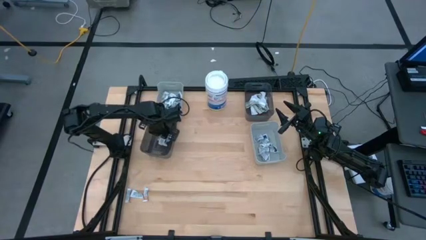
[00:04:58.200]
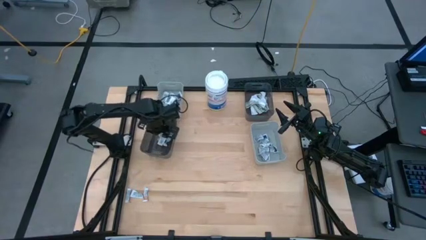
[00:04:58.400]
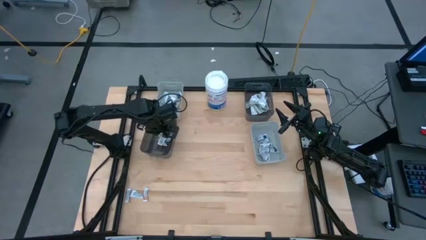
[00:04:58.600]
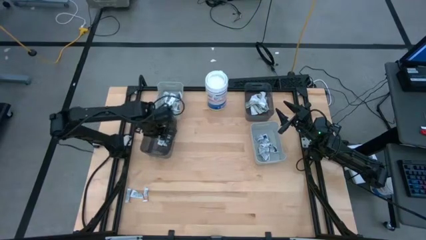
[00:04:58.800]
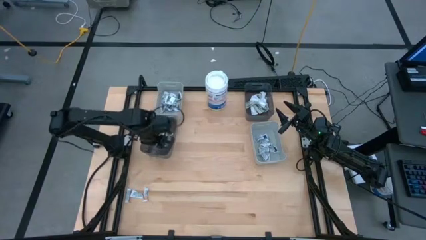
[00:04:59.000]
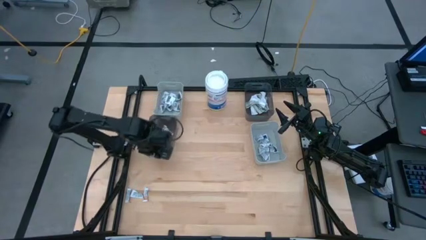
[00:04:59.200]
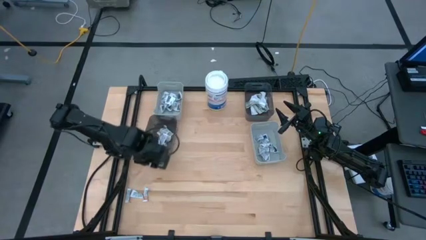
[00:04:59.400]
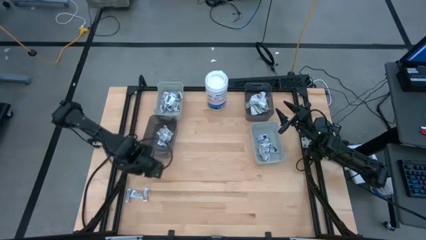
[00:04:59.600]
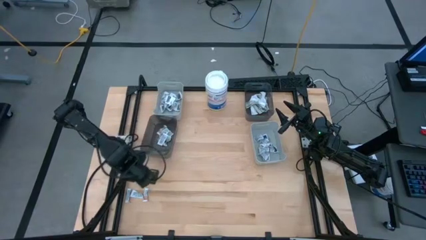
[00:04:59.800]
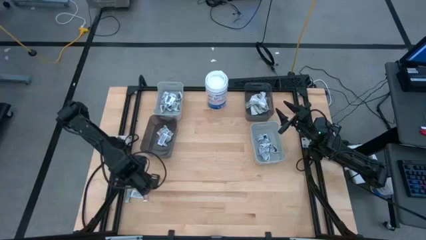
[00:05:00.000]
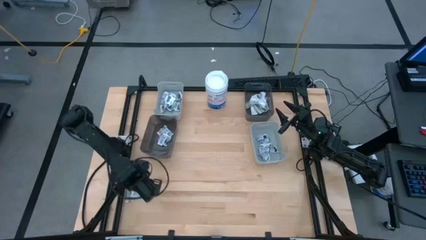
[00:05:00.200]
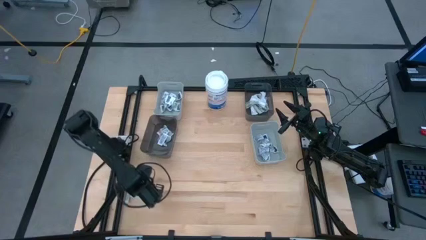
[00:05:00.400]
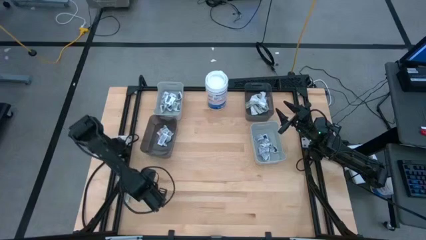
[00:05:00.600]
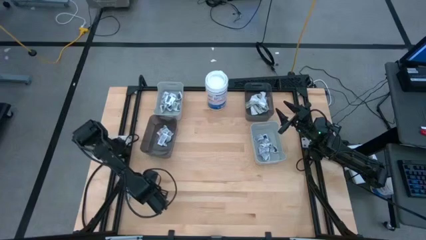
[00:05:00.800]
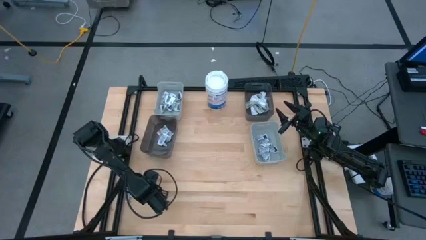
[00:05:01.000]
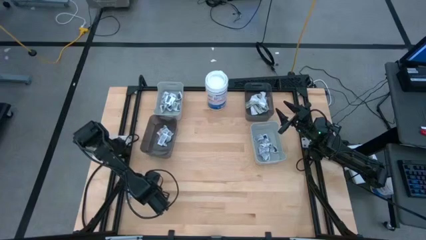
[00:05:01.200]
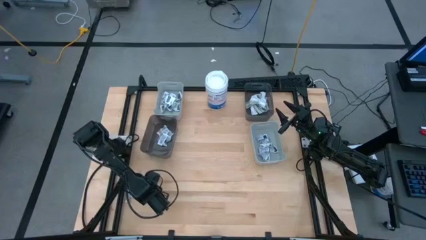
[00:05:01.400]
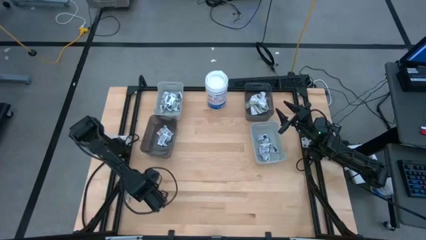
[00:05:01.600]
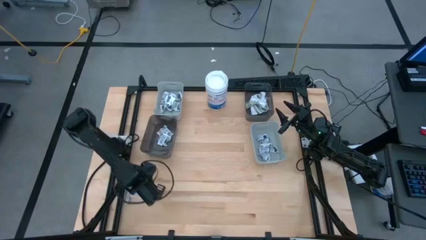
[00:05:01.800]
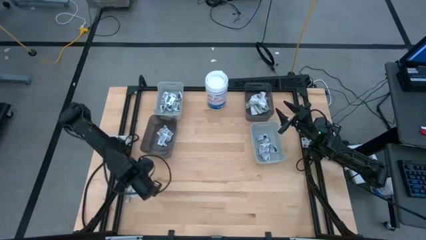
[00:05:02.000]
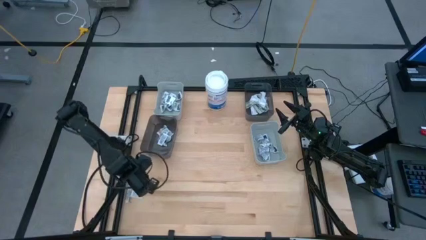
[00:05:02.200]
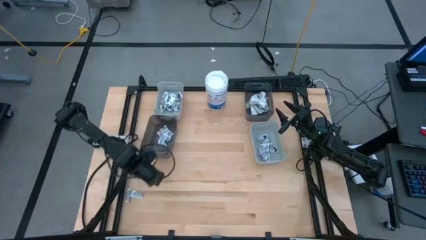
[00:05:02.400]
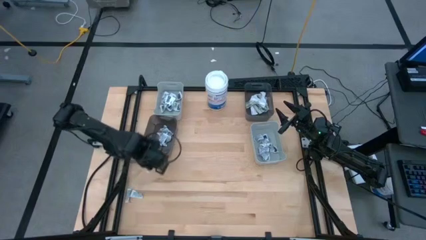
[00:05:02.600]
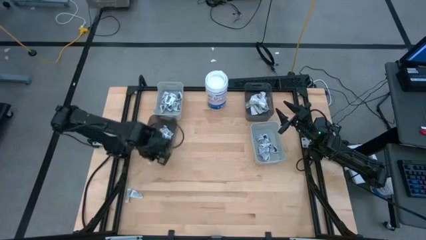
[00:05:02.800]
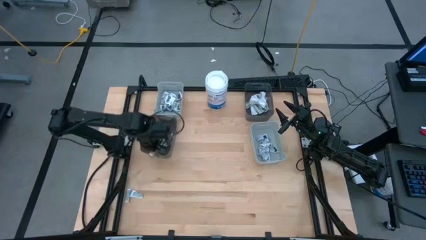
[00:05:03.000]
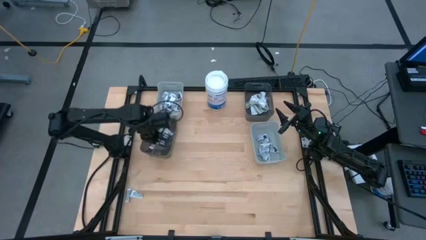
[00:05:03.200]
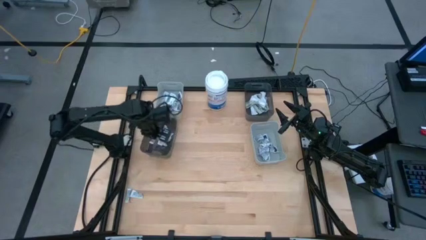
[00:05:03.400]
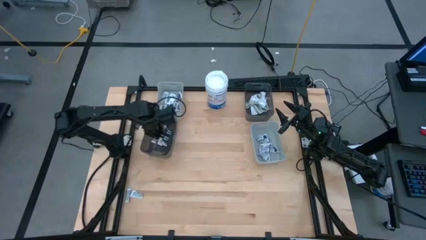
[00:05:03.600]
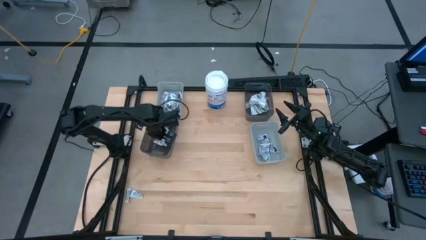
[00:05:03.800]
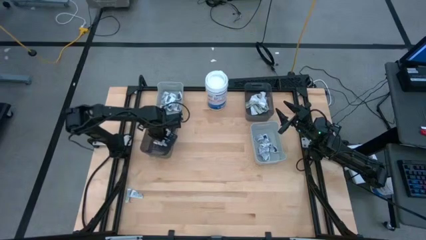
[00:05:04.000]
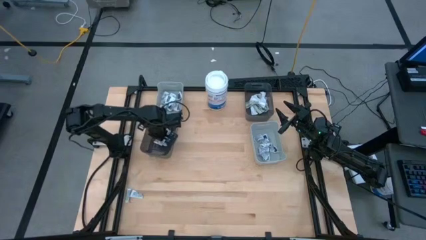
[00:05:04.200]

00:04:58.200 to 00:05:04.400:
Task: Pick & Place First Aid Supplies
Put the orange ointment pack into the left black bin

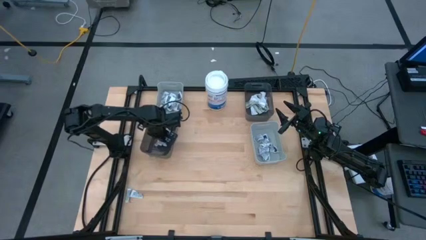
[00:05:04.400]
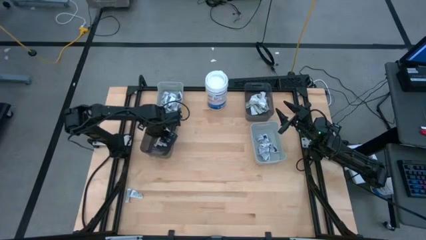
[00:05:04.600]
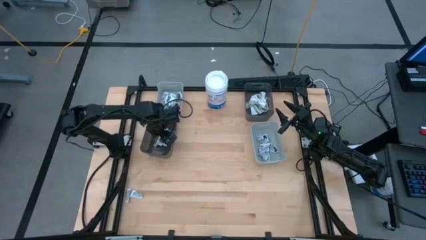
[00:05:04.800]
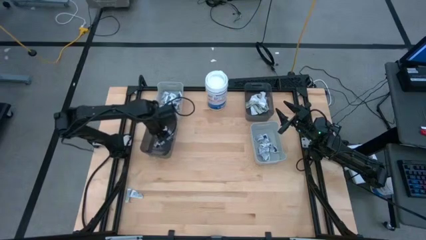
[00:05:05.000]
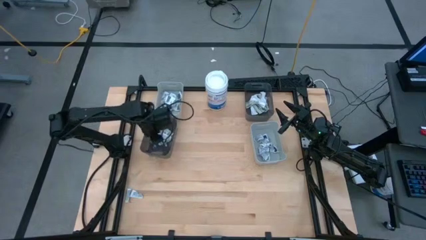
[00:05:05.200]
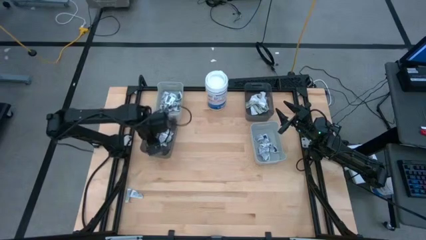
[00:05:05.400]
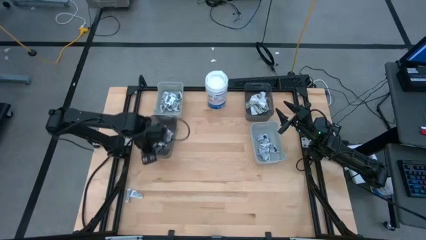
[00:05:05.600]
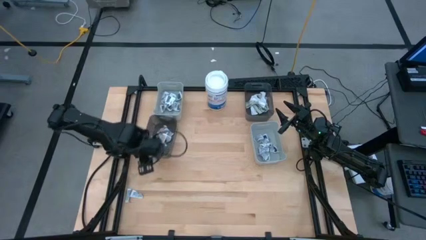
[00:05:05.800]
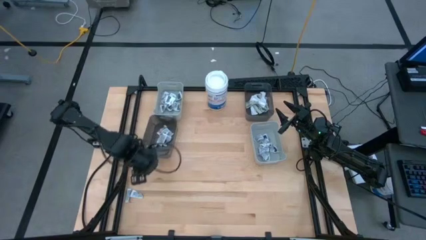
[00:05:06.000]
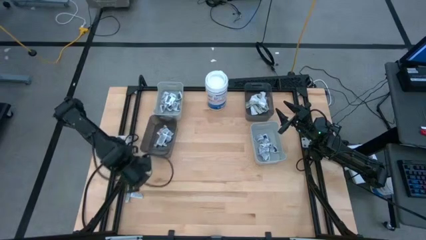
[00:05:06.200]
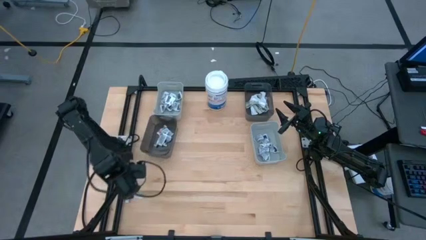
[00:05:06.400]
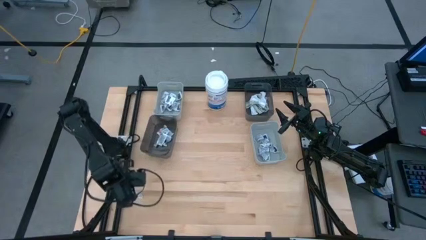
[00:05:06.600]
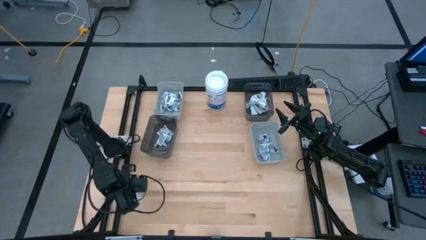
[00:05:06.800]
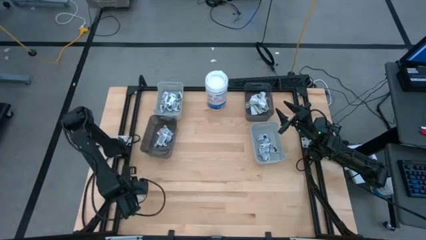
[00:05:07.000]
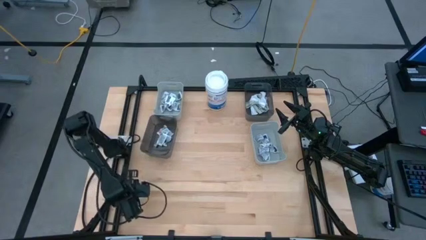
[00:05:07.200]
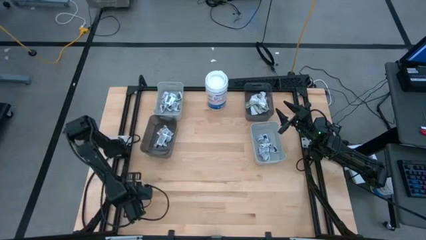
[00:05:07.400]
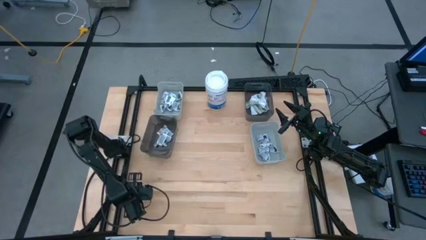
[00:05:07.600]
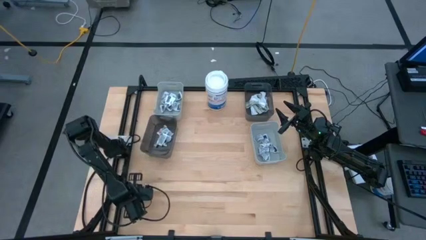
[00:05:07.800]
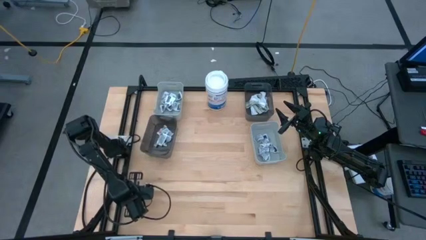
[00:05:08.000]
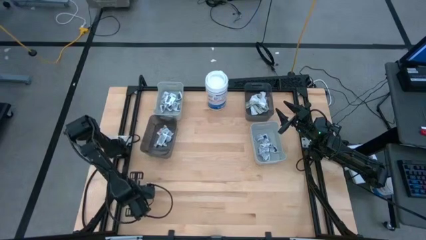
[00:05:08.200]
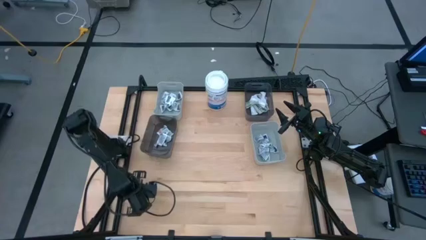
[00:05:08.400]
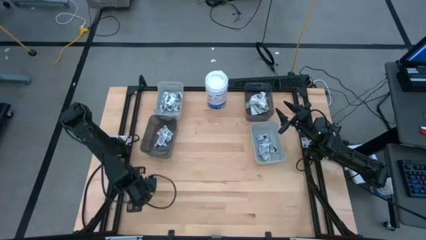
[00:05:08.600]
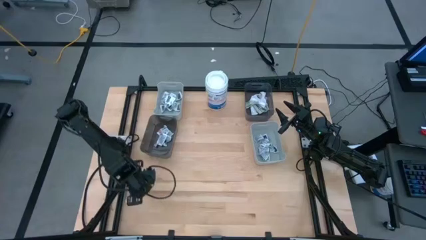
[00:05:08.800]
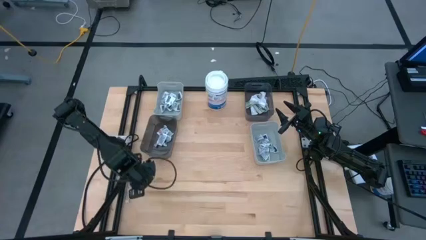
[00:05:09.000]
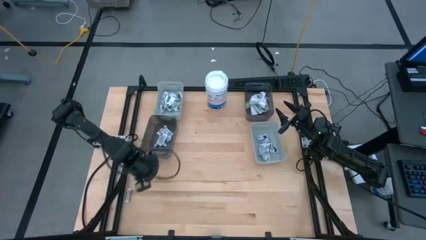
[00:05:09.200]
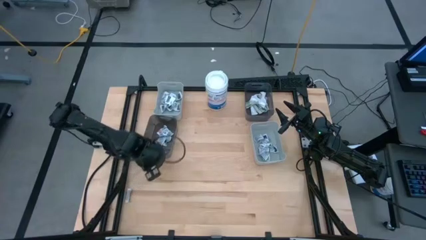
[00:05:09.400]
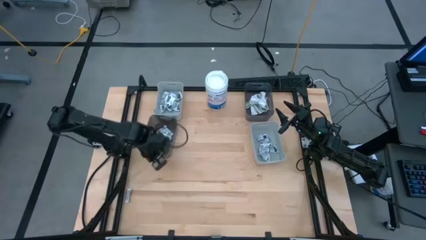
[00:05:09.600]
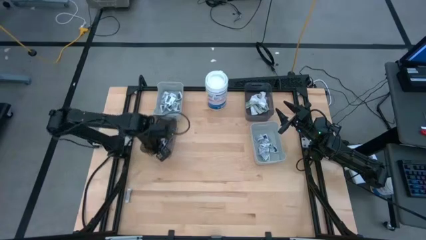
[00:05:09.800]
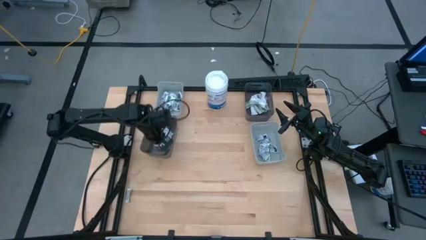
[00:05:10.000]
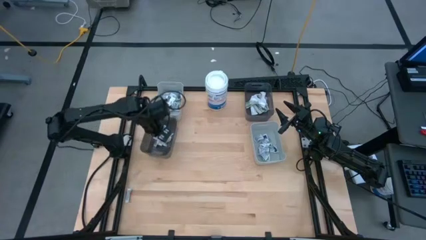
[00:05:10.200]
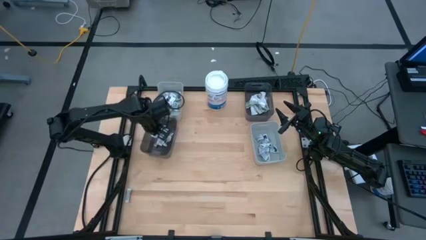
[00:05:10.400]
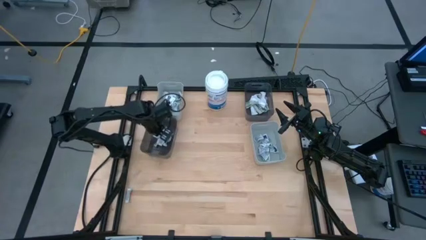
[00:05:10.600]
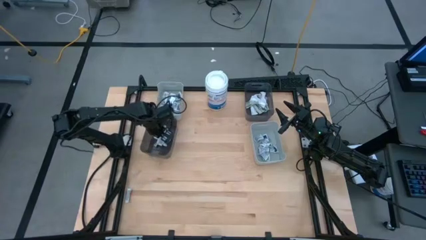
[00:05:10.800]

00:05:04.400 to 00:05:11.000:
Put the orange ointment pack into the left black bin
